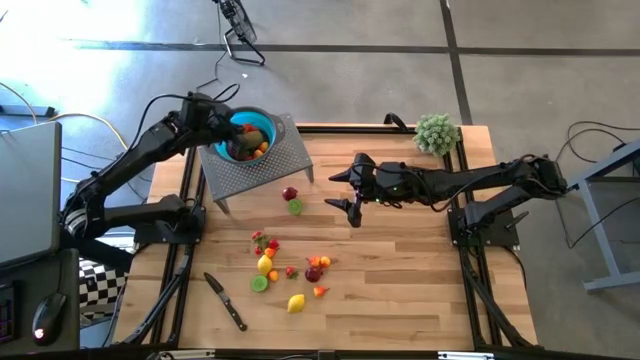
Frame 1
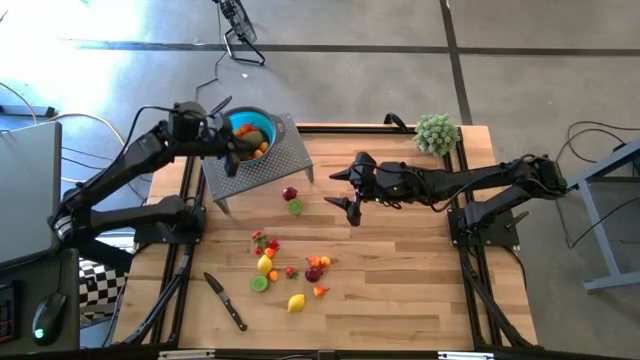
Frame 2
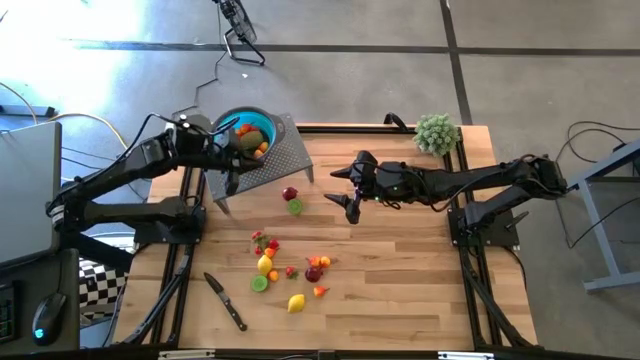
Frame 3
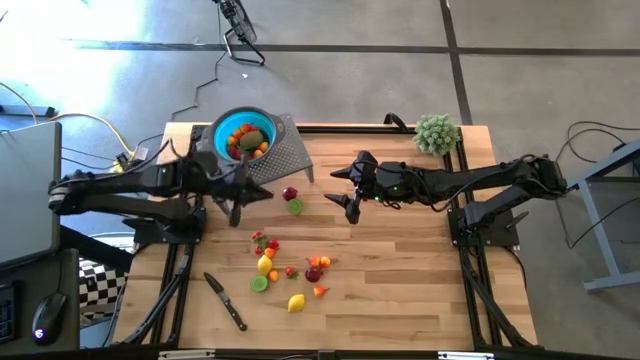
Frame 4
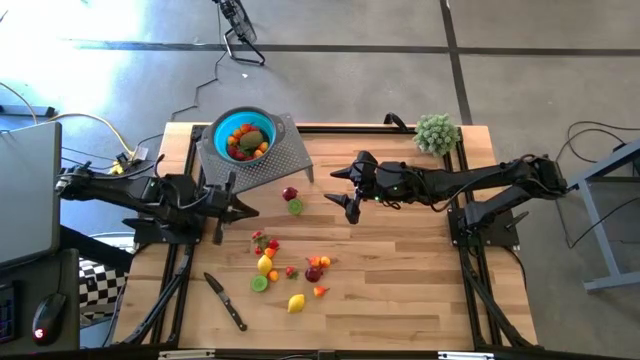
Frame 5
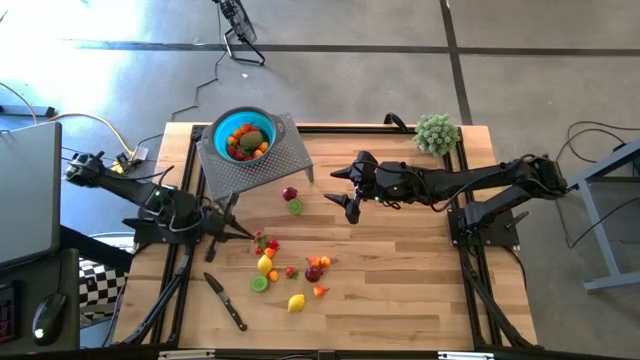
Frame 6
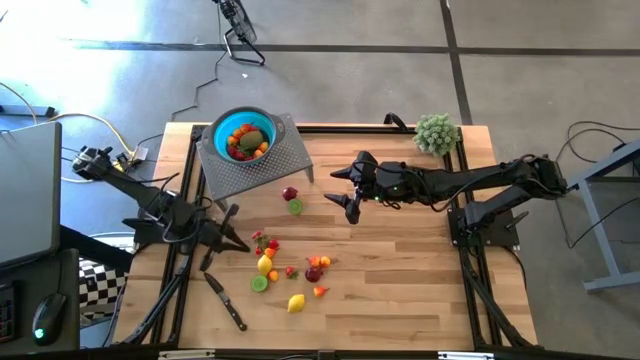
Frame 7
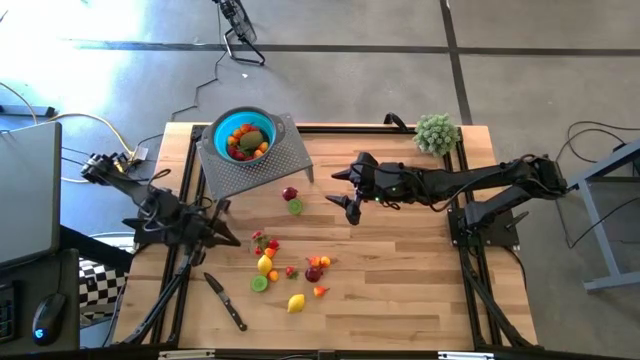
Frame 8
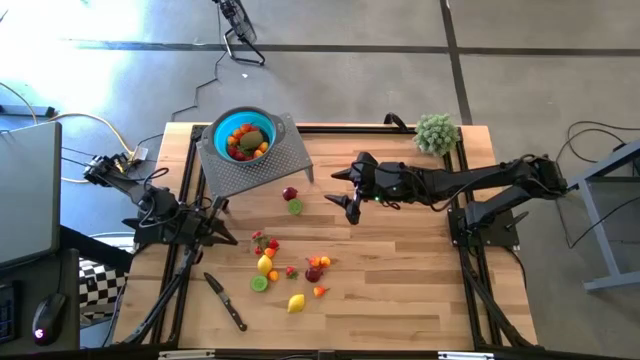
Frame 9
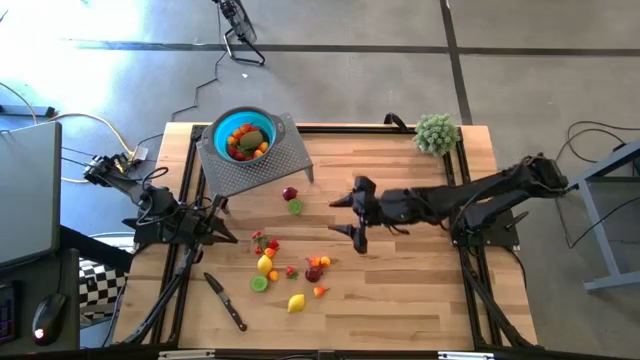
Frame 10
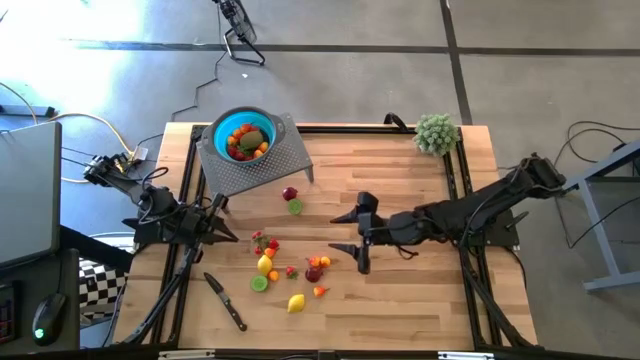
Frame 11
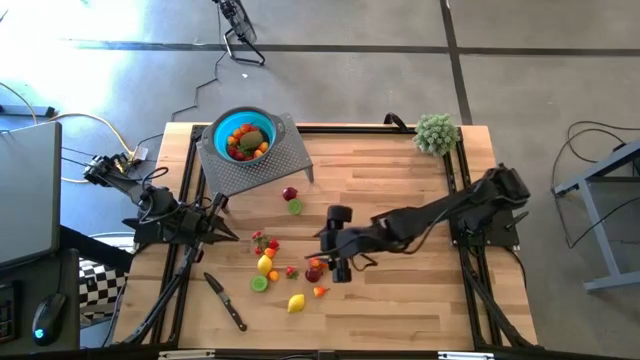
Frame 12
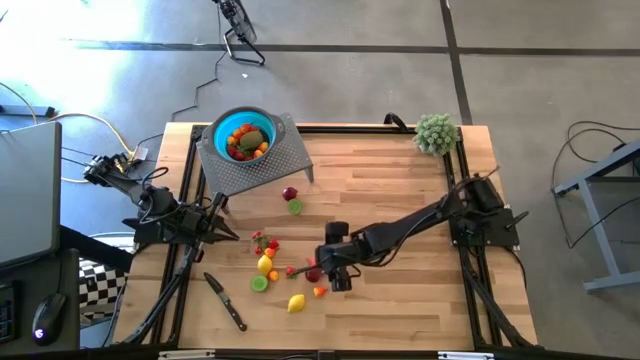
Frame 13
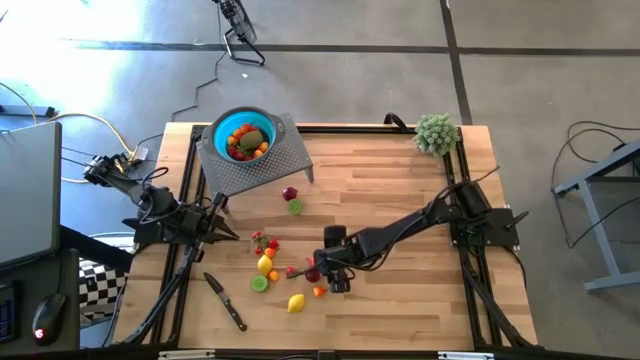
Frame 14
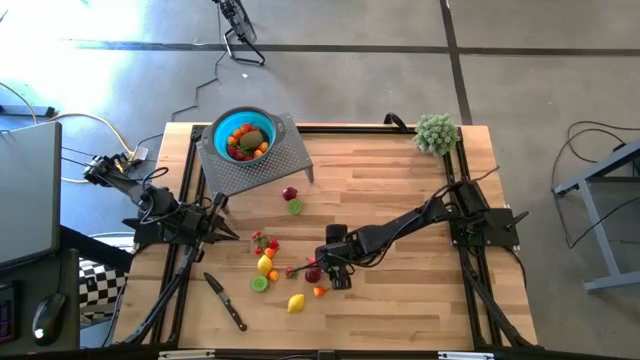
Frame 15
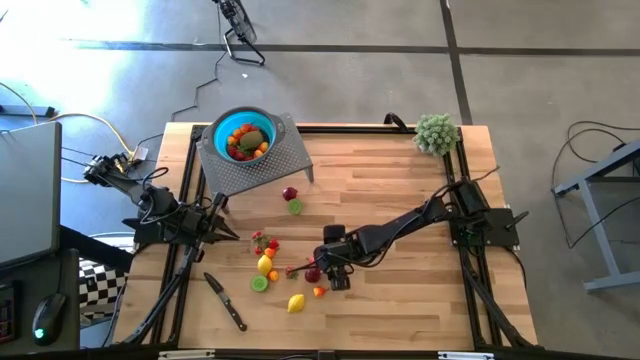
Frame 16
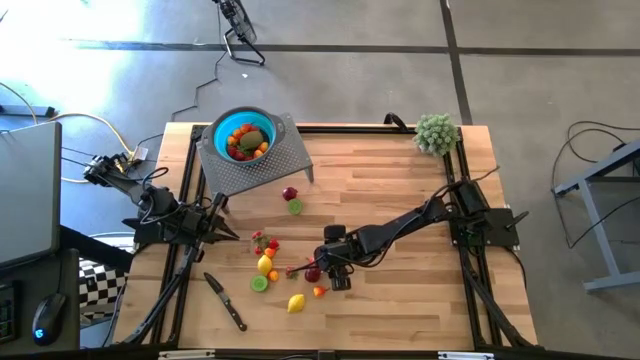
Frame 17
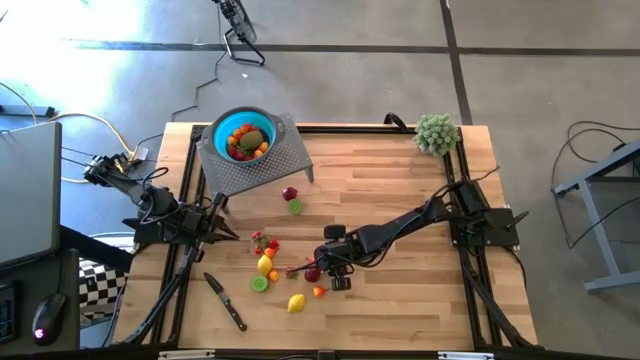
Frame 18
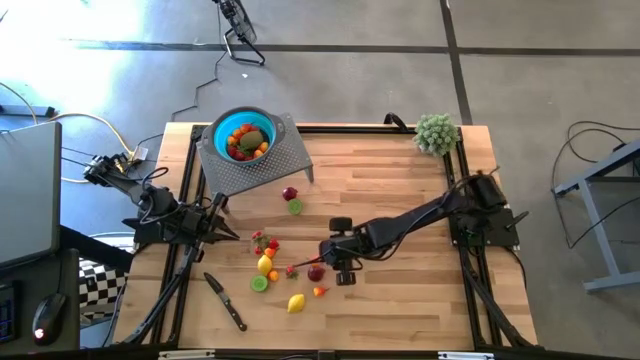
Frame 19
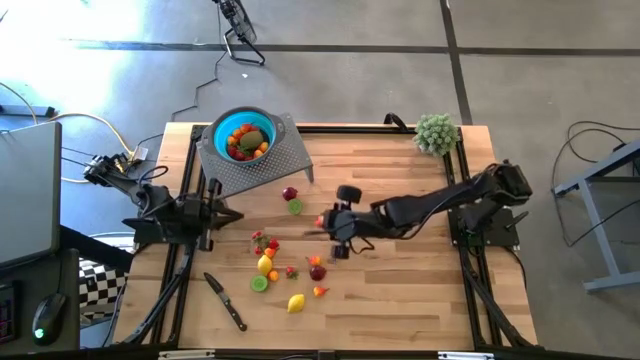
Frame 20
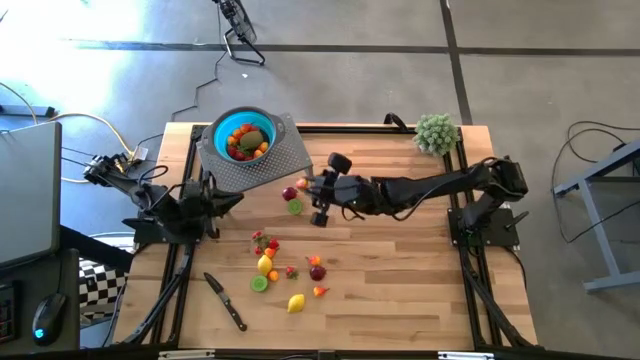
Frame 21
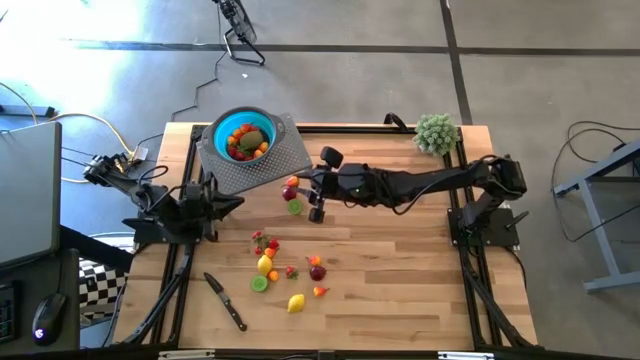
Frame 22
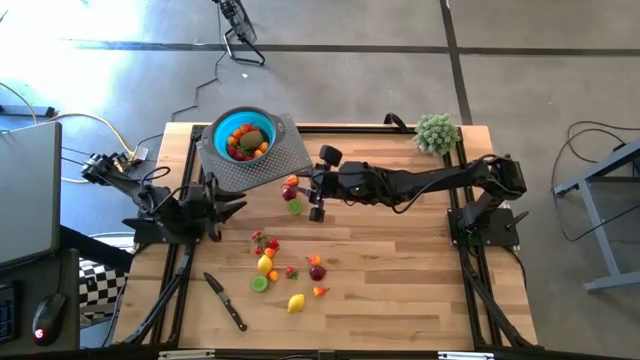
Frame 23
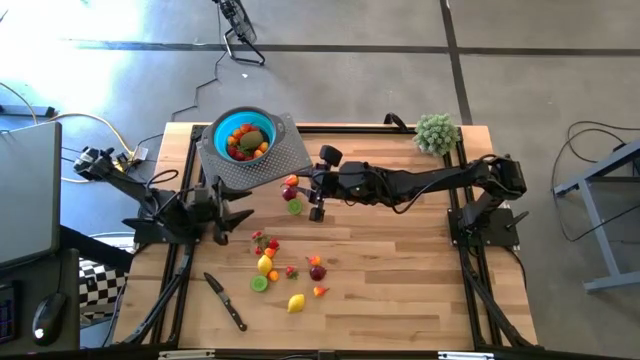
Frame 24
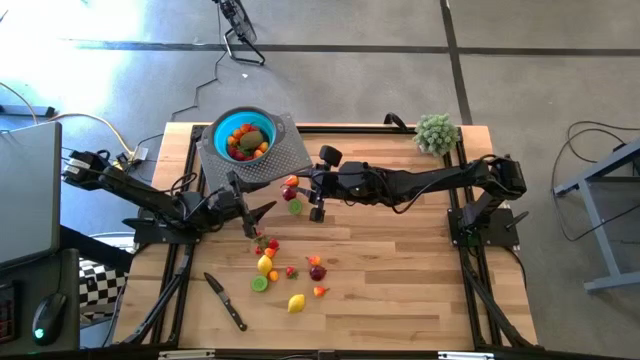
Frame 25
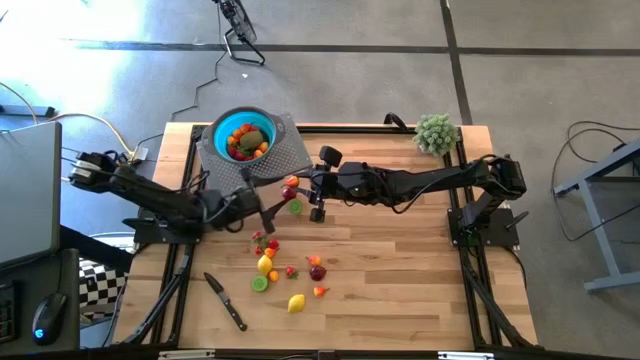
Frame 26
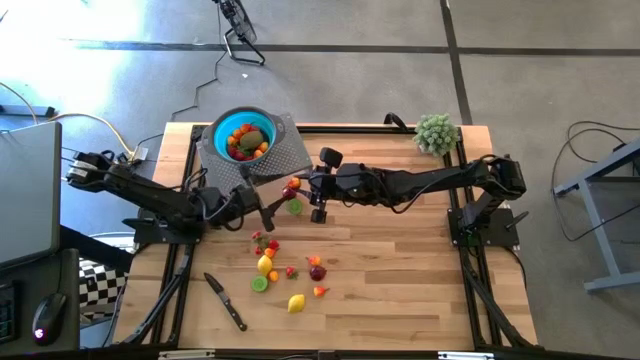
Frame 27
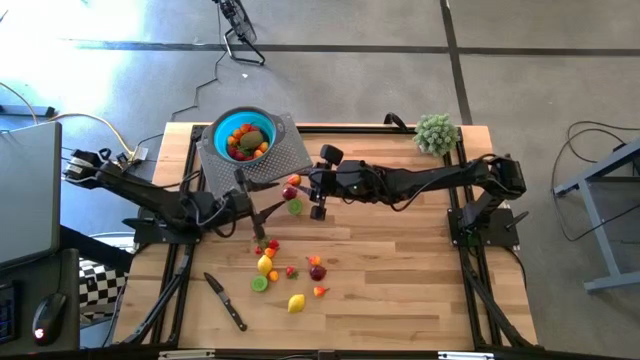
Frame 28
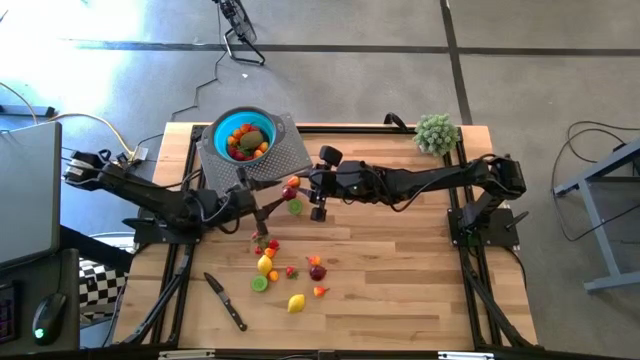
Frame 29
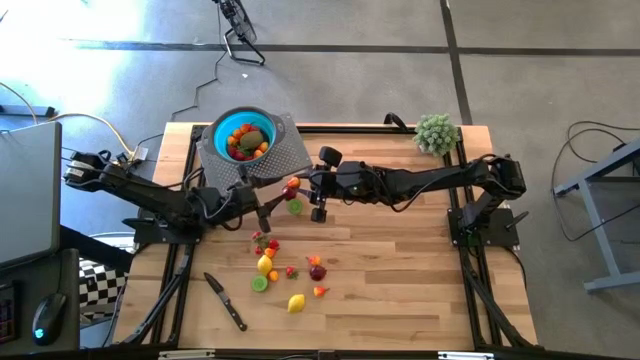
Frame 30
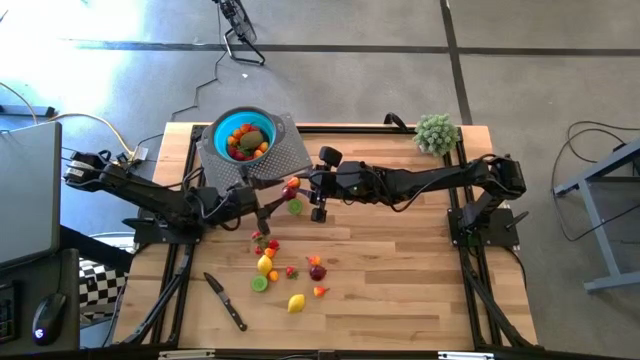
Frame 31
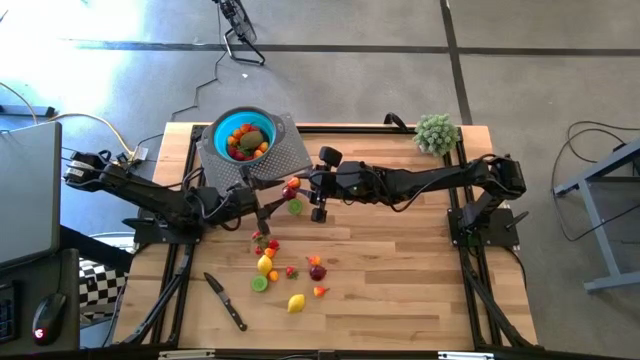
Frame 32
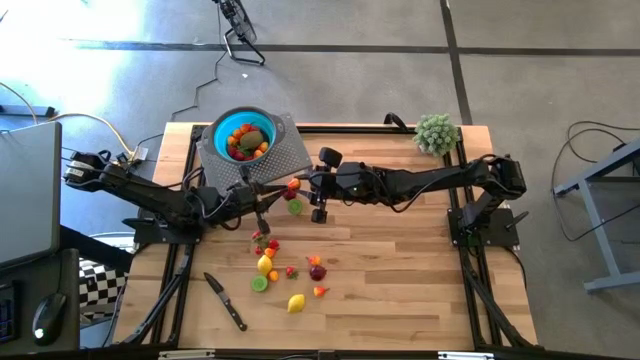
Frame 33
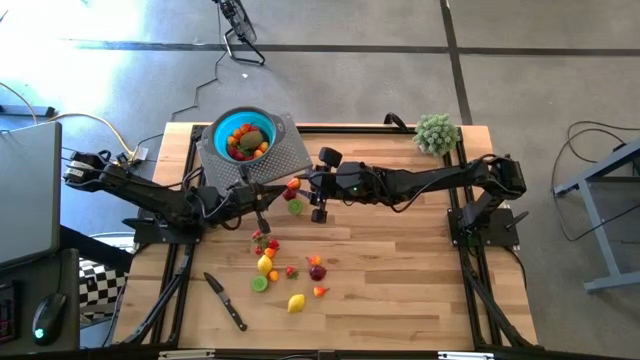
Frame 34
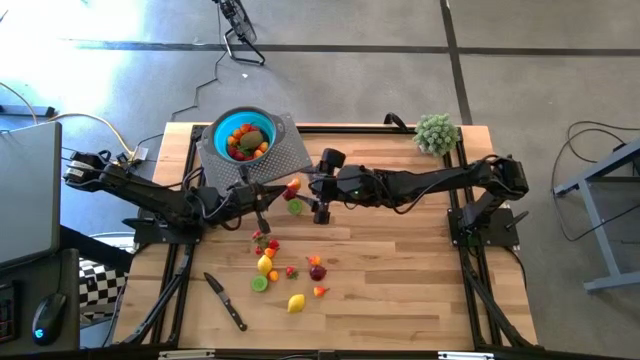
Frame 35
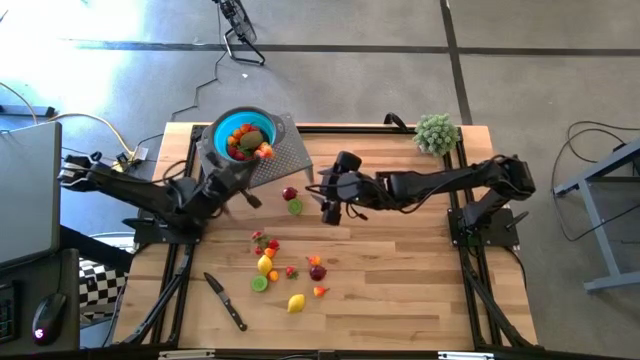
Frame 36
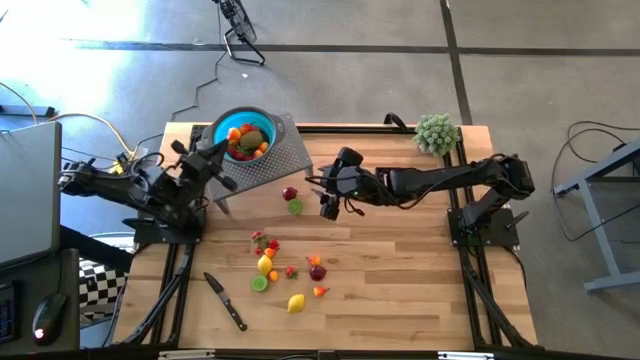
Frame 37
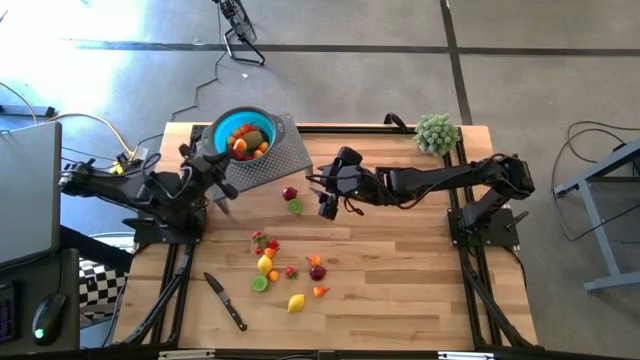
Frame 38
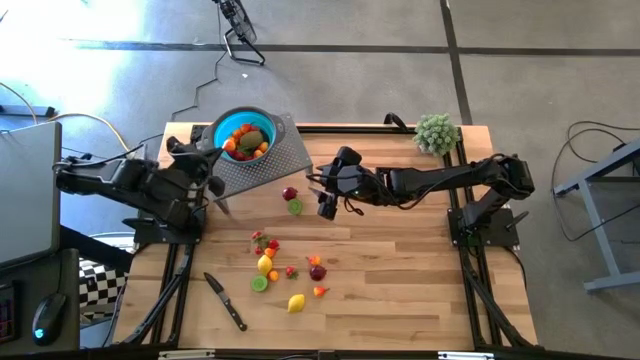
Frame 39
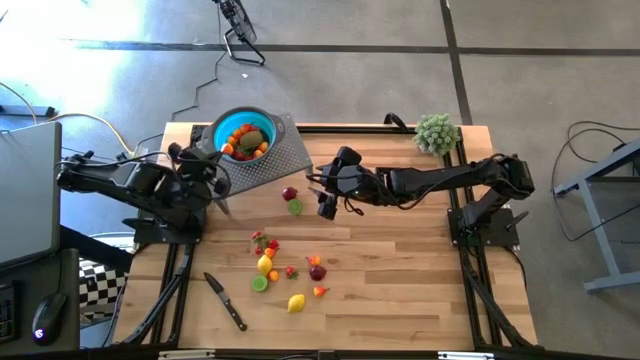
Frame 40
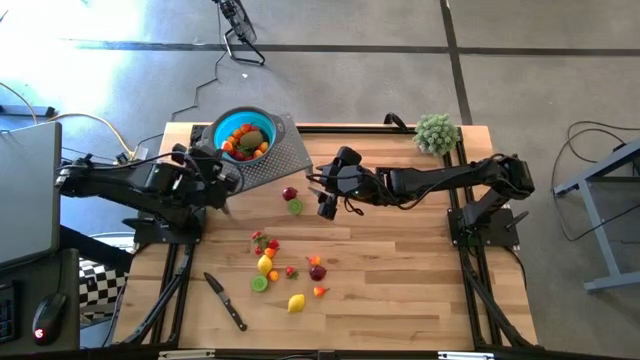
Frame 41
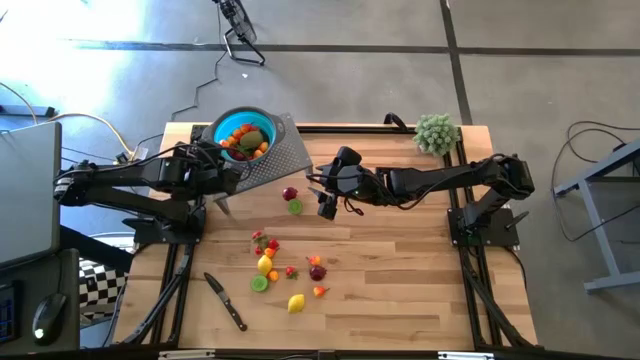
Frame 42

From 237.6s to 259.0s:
Task: Pick & Place Fruit
Put the orange pear into the blue strainer bowl on the shelf
